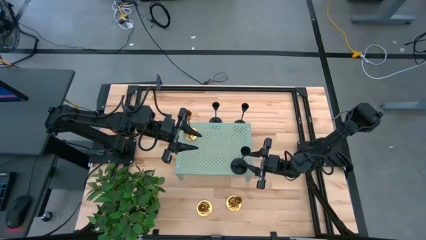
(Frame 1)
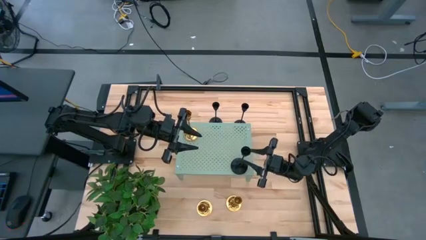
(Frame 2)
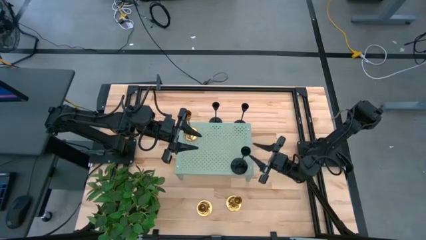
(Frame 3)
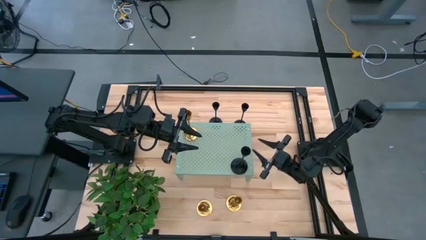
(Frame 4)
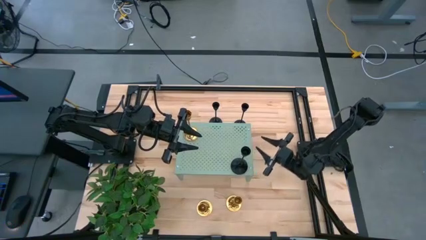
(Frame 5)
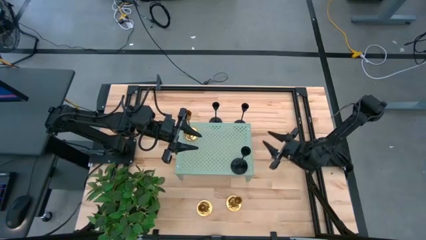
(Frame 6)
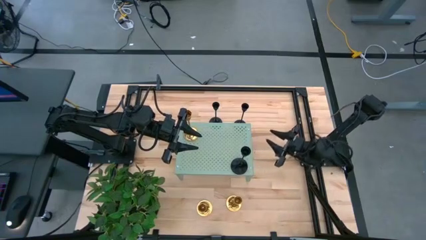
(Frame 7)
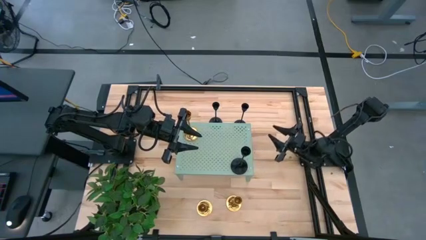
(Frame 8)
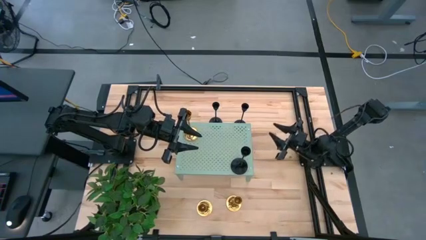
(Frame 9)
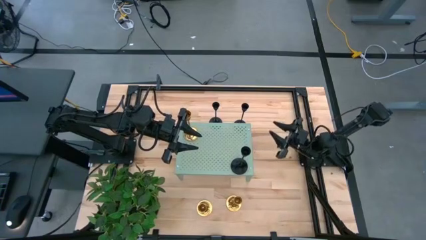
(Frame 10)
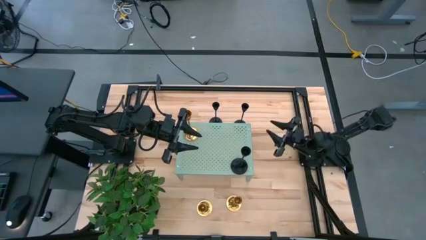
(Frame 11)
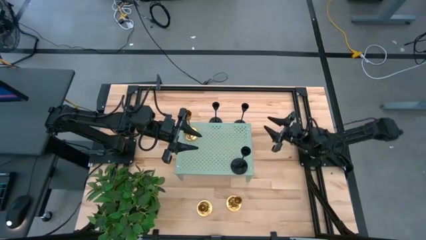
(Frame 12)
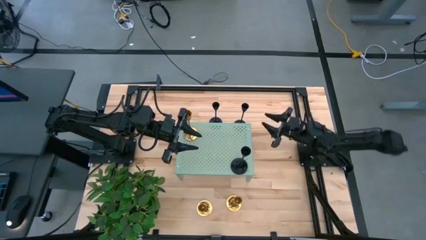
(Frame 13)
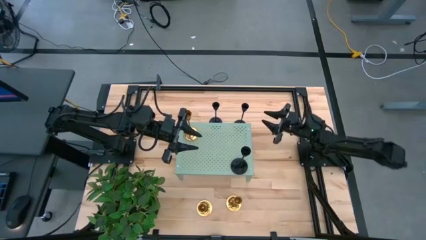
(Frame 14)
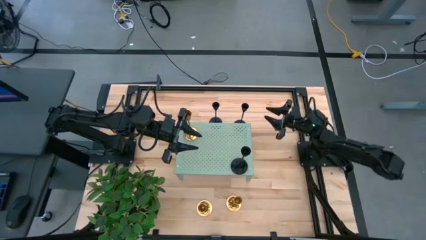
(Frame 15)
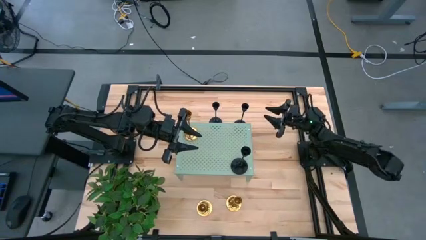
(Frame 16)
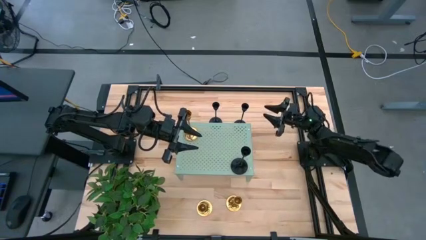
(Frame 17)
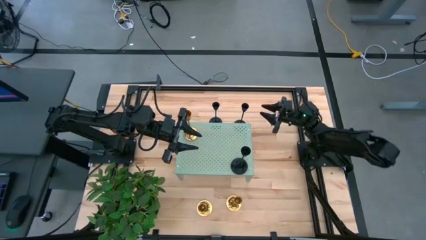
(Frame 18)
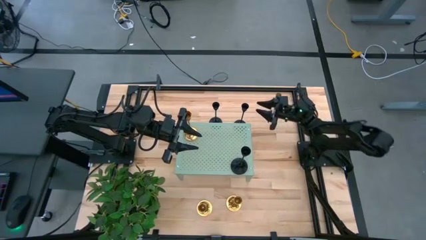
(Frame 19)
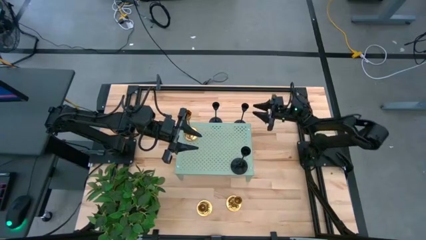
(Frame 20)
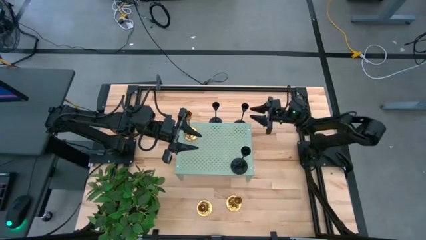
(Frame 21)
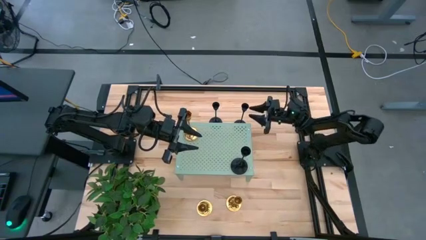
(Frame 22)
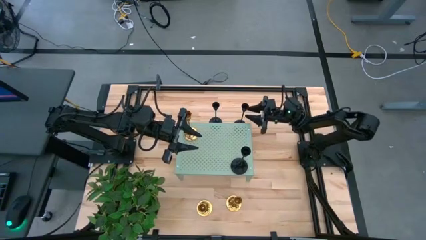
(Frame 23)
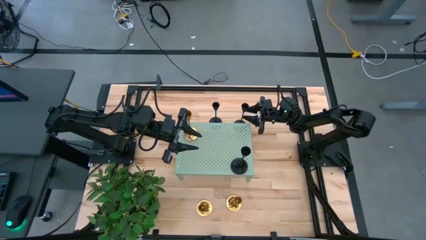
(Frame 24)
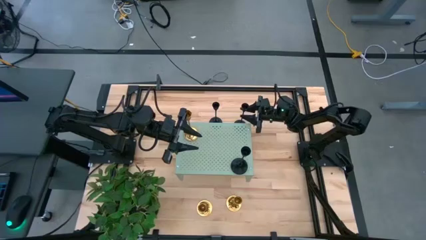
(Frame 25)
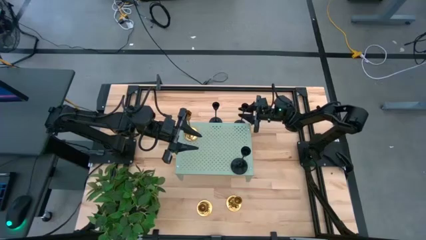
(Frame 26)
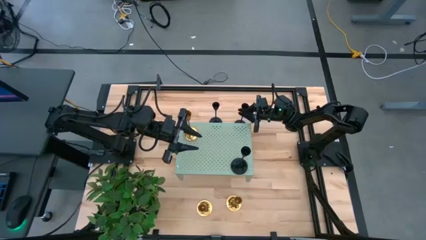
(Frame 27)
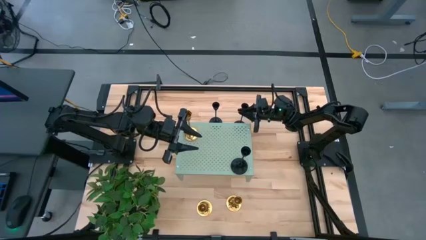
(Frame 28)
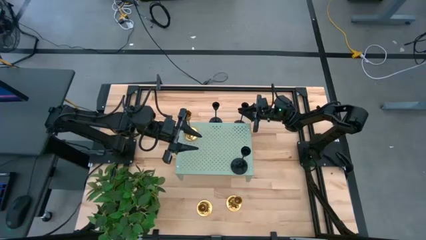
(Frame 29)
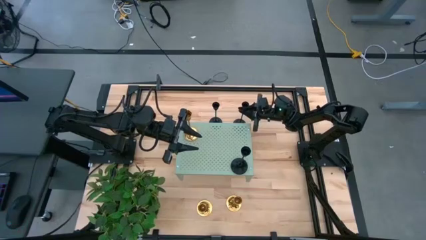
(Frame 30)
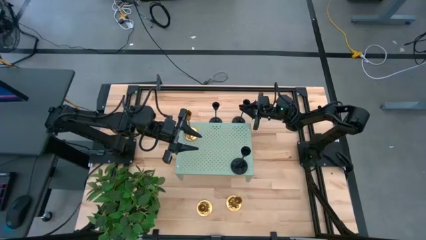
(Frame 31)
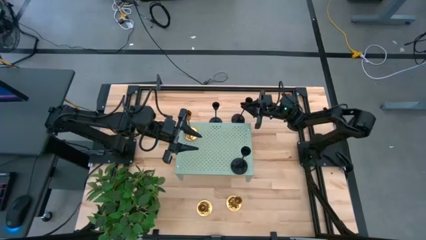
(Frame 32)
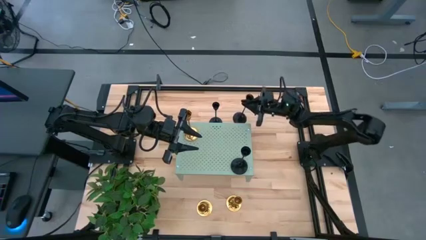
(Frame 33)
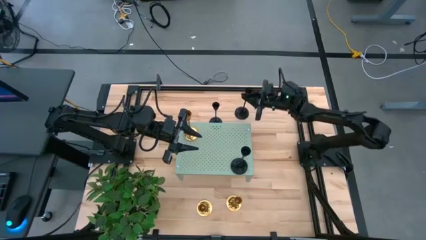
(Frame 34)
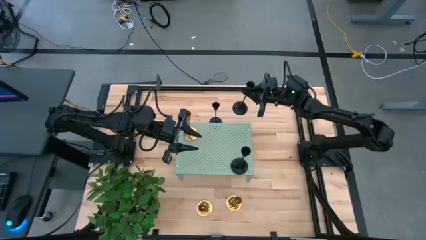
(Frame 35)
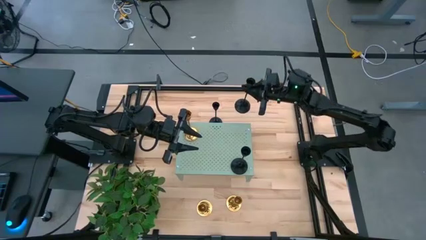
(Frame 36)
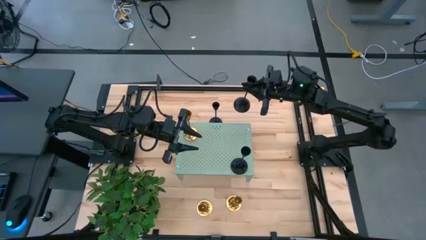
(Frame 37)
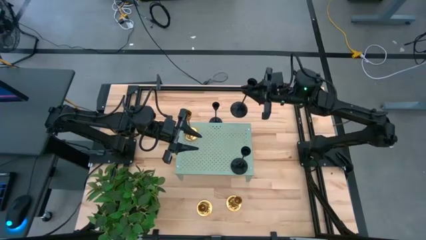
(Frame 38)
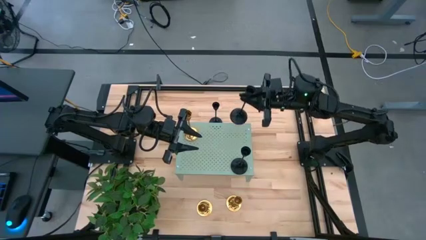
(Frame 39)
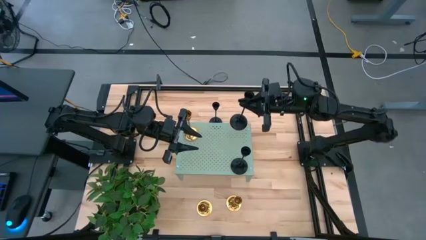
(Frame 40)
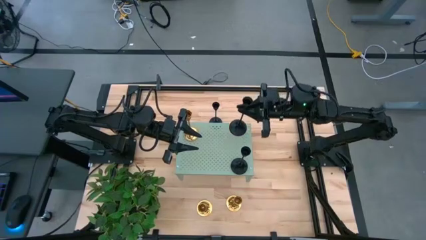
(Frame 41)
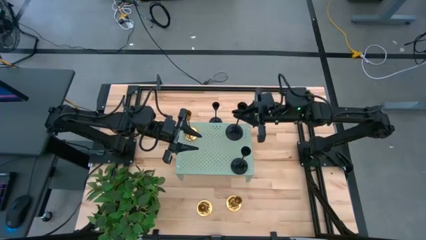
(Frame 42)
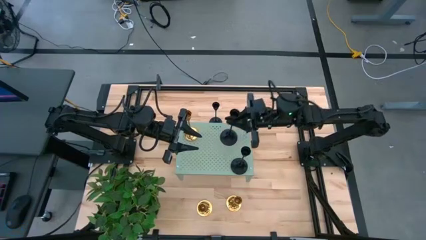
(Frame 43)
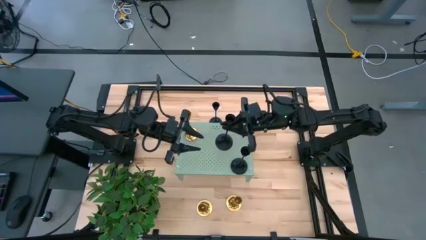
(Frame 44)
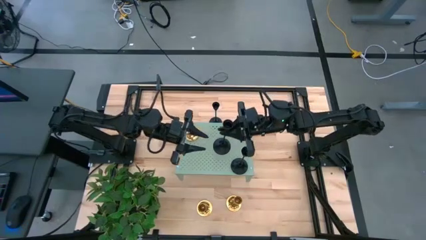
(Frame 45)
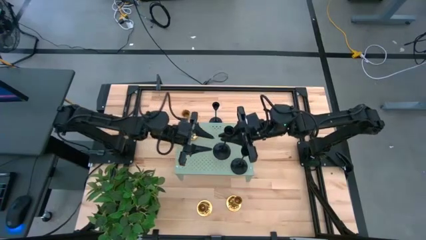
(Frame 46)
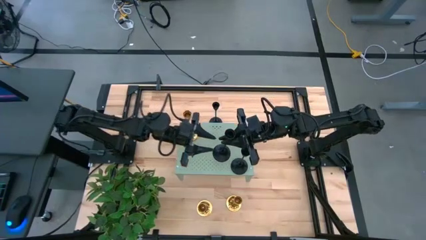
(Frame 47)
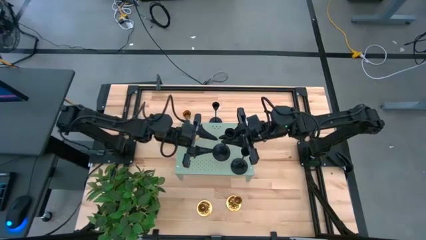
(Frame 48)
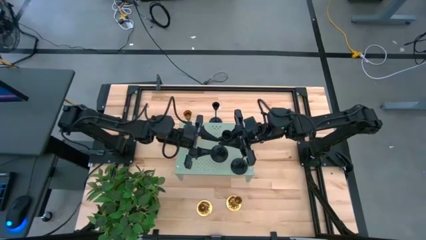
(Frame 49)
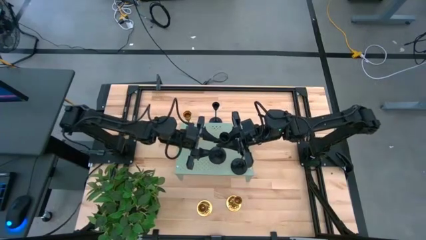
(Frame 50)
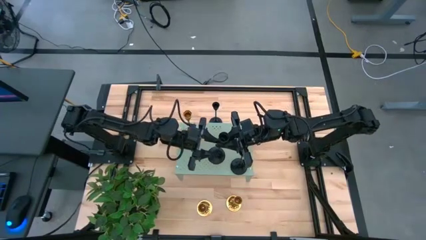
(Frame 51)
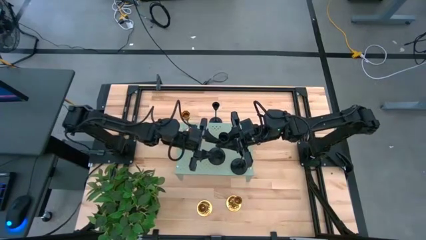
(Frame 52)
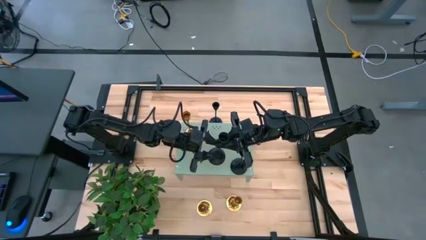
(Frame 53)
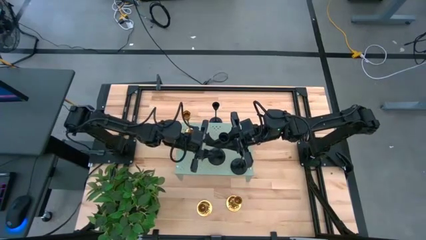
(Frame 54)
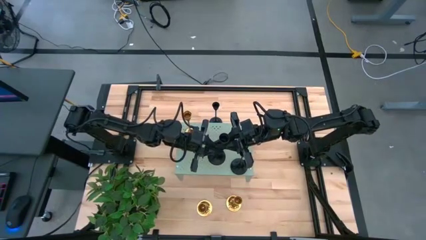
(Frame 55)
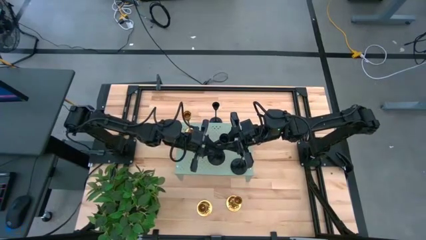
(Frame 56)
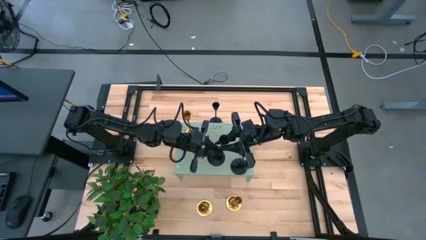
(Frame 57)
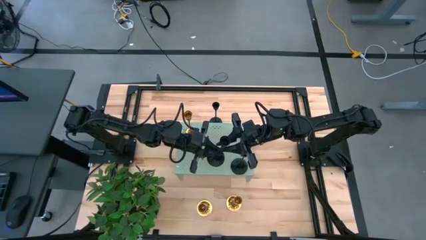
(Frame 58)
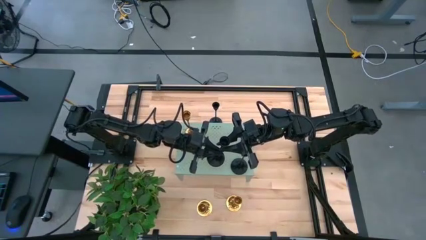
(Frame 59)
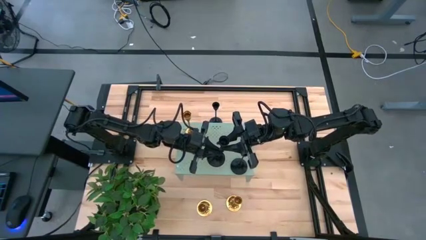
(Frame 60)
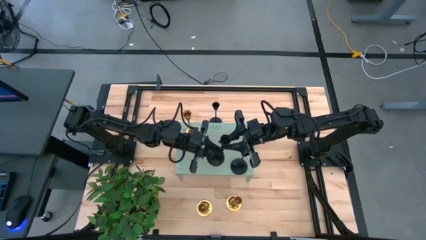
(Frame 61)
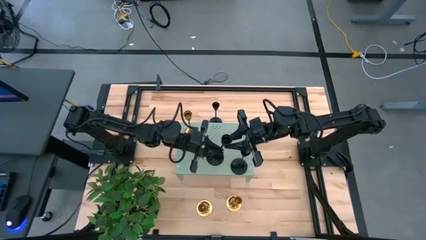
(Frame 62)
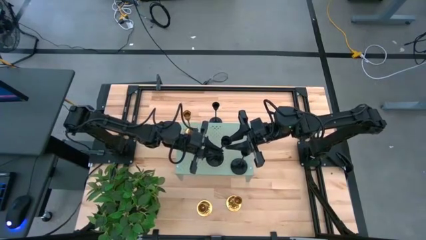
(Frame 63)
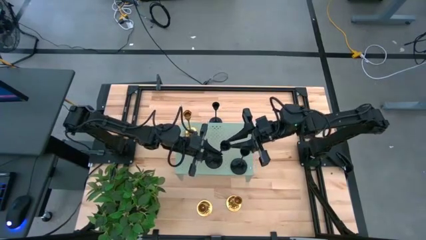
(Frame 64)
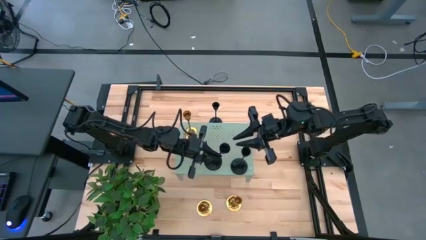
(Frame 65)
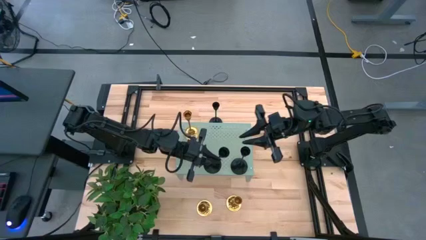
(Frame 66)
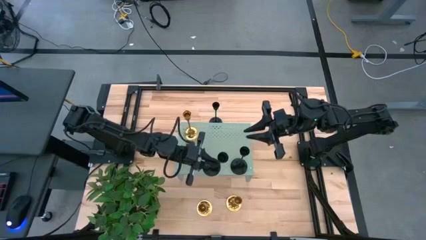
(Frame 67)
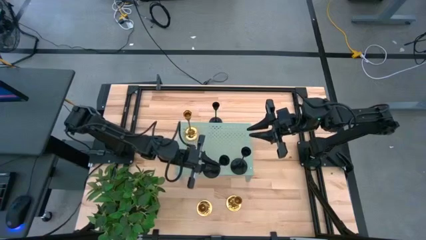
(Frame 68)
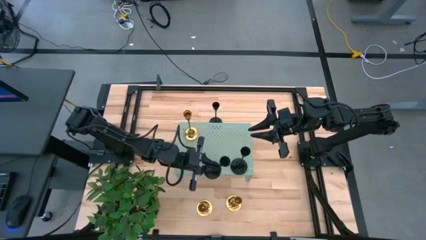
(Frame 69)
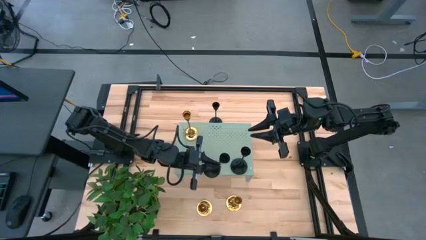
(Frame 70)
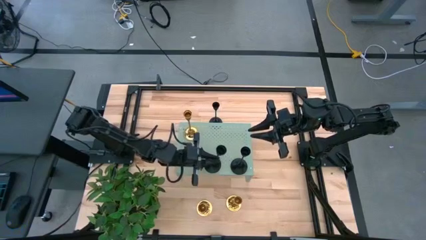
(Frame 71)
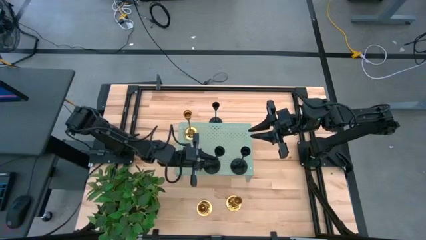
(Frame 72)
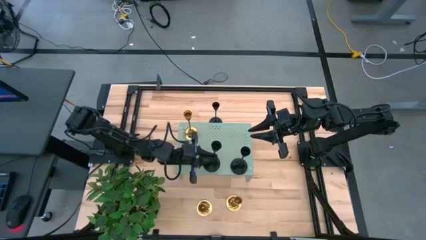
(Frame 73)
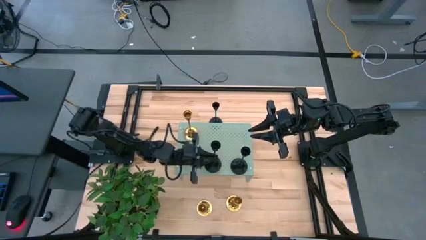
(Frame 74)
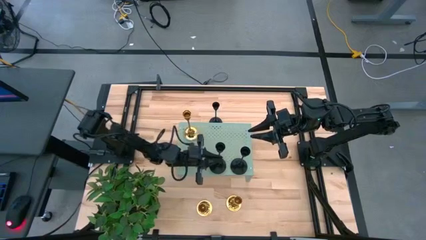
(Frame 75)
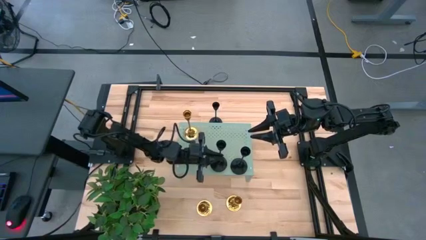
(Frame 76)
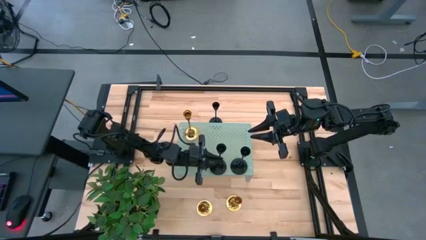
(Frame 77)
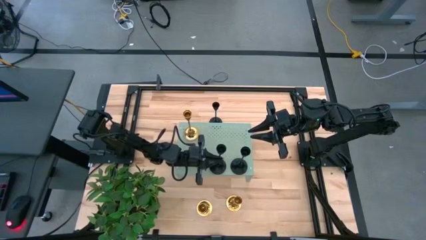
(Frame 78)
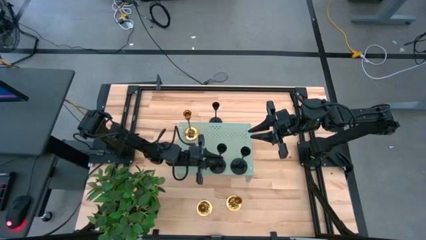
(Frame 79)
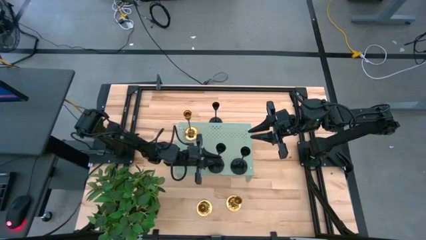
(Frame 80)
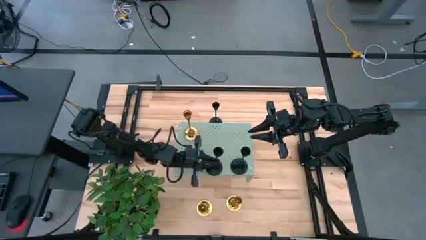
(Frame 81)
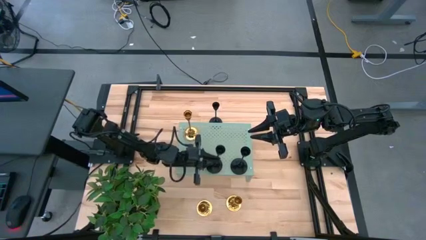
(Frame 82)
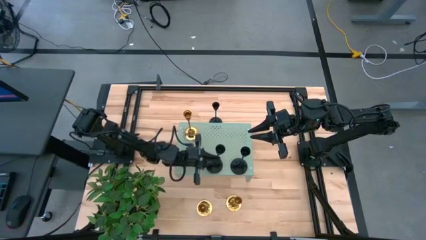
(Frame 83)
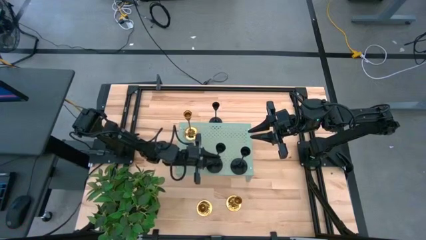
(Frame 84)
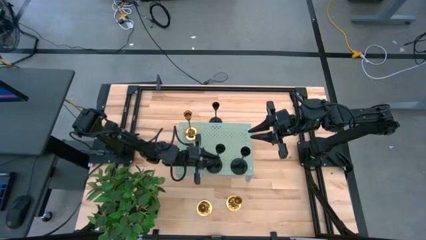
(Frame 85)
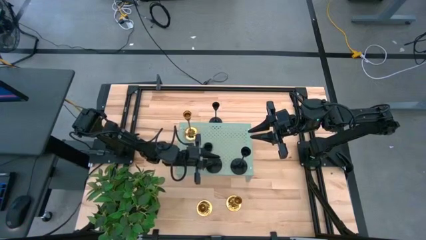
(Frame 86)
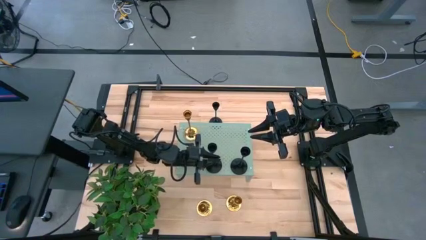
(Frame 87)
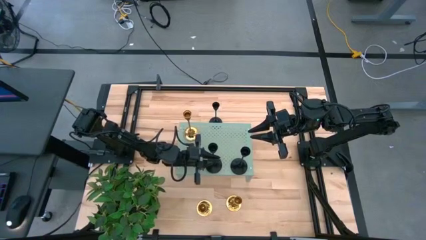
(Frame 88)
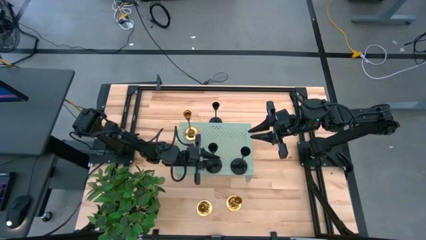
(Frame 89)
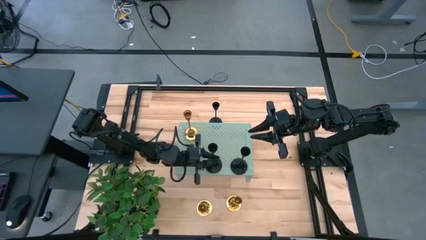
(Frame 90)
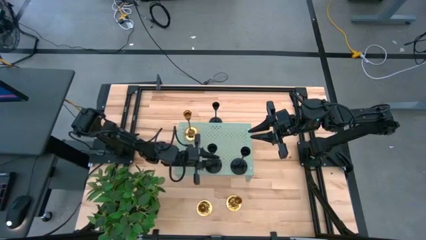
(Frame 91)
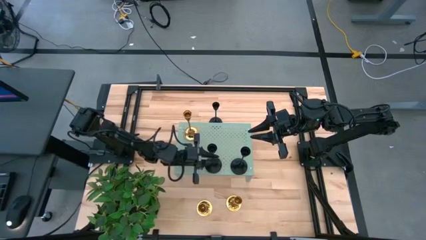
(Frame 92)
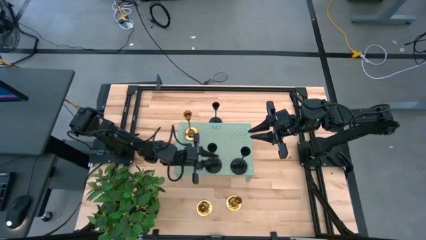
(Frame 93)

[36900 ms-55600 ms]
Task: Pick & Place candle stick holders
Put the top right black candle holder on the shelf
